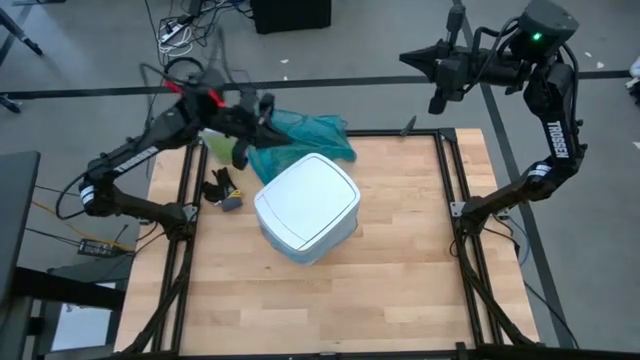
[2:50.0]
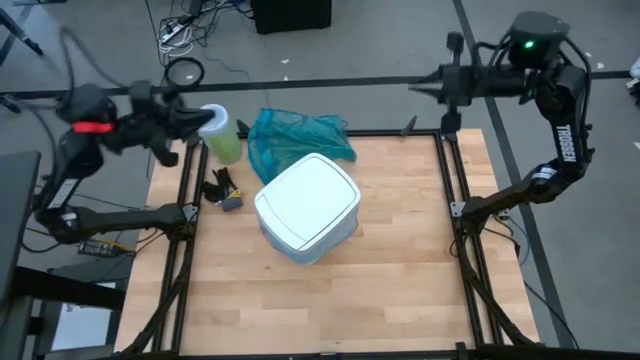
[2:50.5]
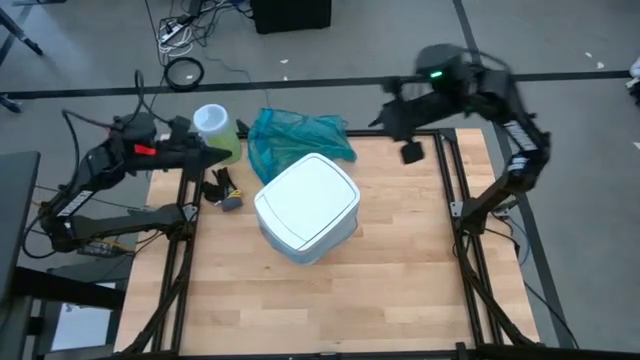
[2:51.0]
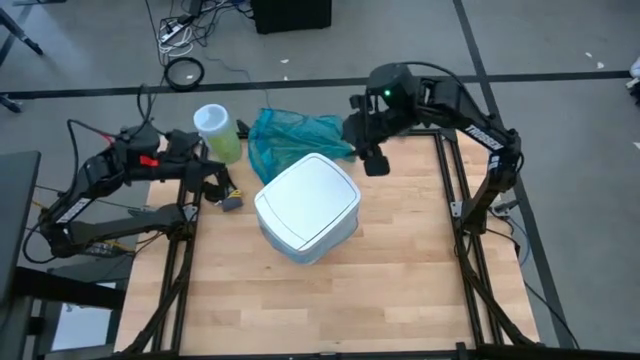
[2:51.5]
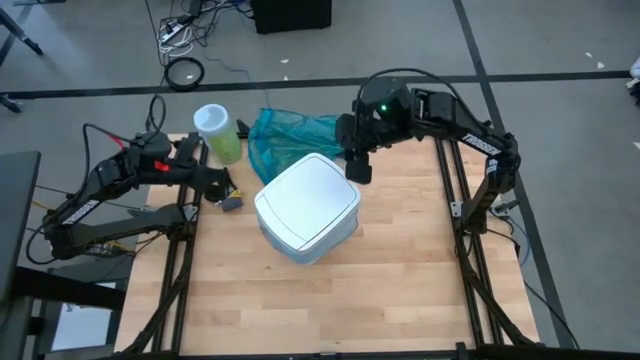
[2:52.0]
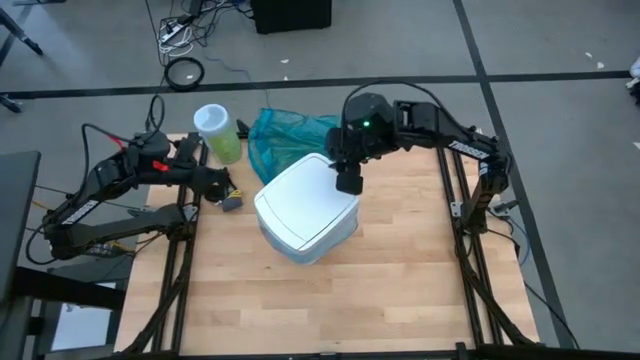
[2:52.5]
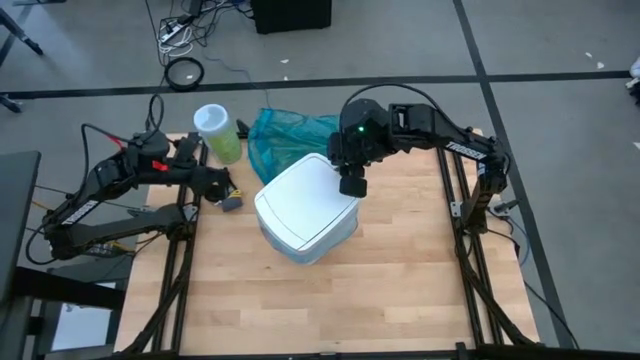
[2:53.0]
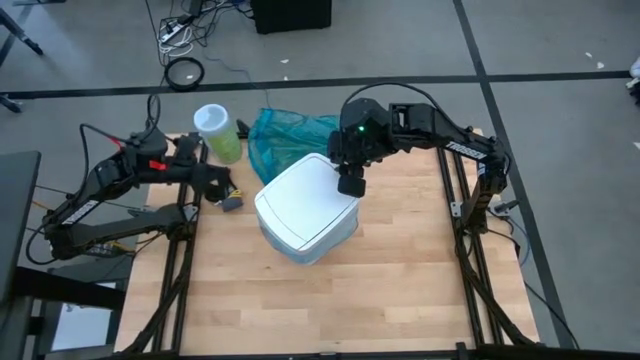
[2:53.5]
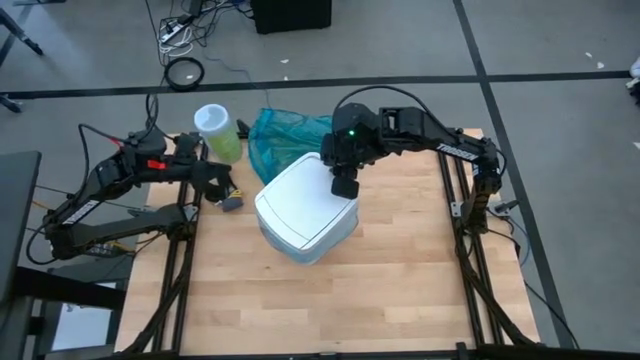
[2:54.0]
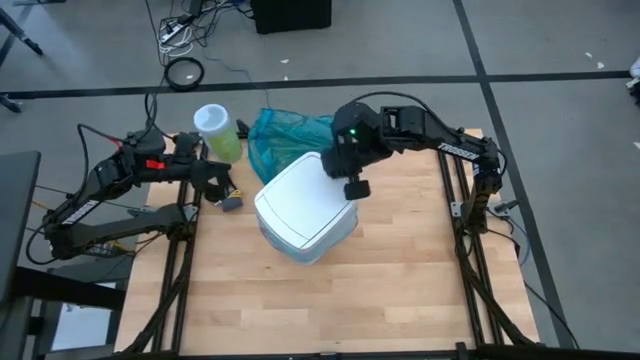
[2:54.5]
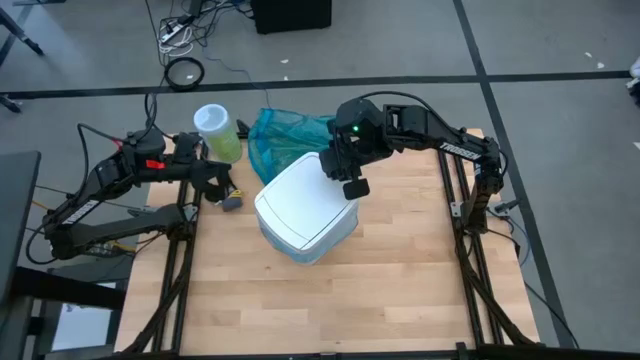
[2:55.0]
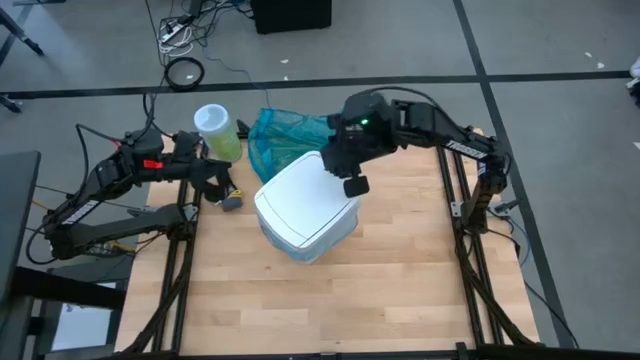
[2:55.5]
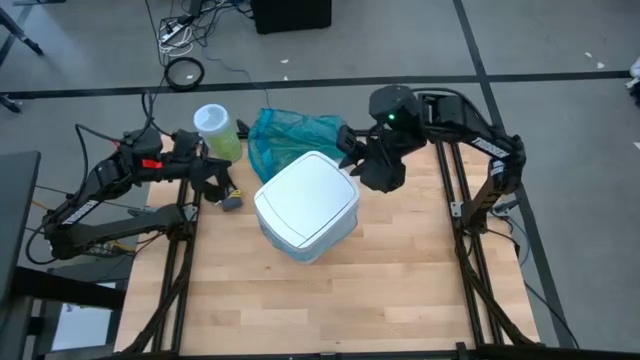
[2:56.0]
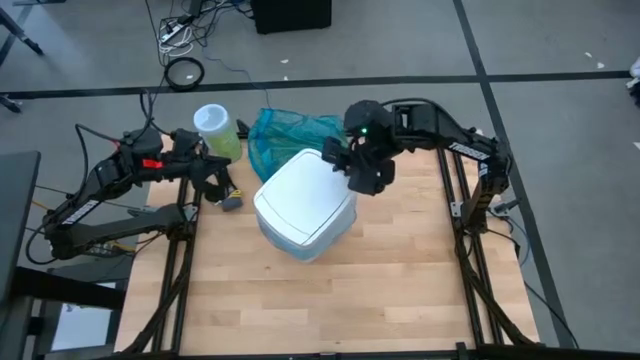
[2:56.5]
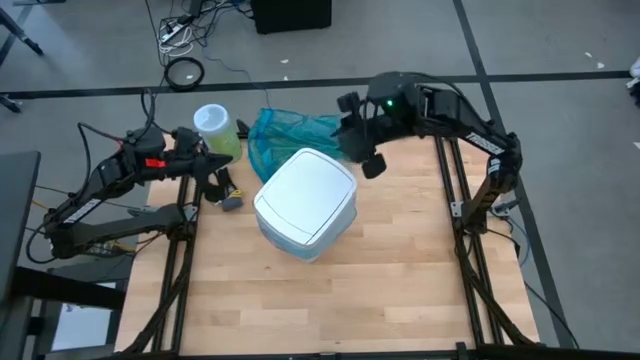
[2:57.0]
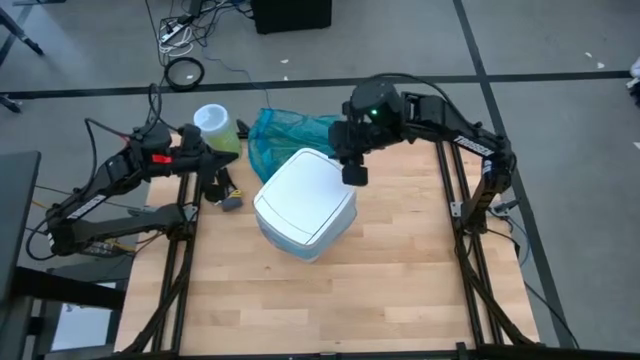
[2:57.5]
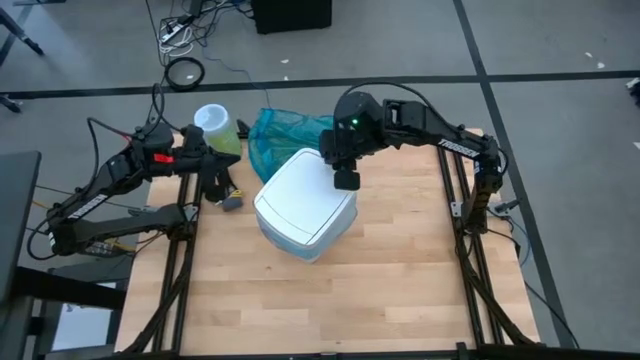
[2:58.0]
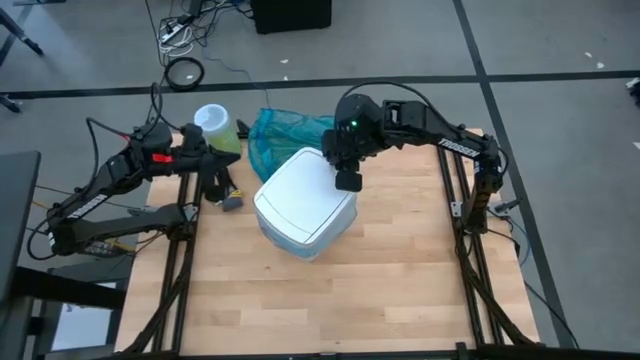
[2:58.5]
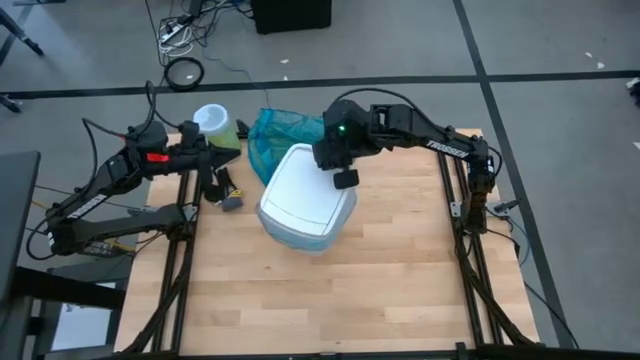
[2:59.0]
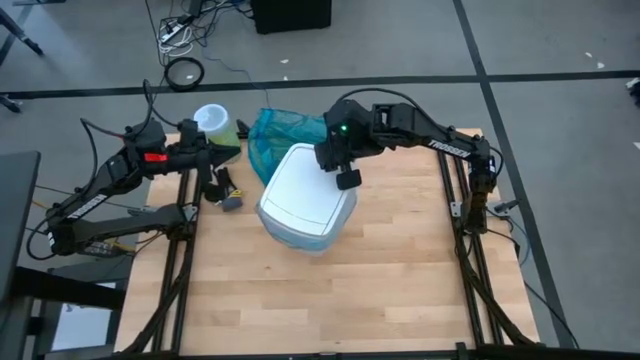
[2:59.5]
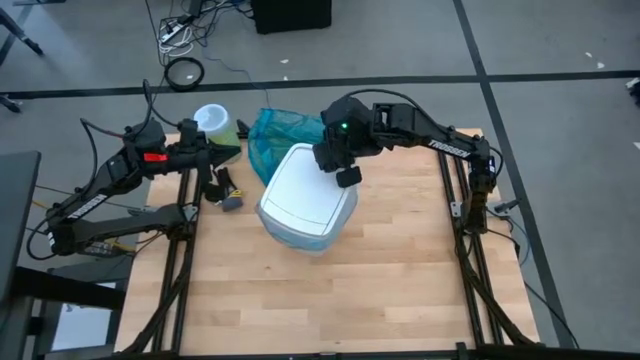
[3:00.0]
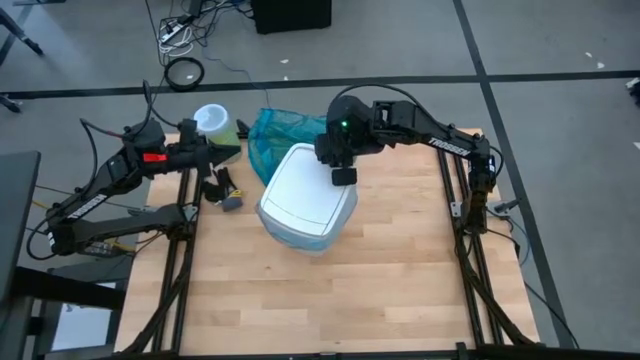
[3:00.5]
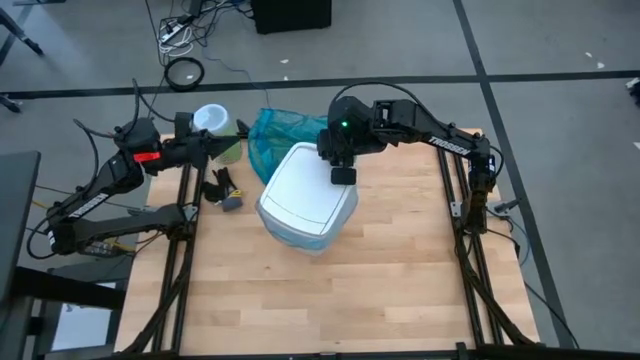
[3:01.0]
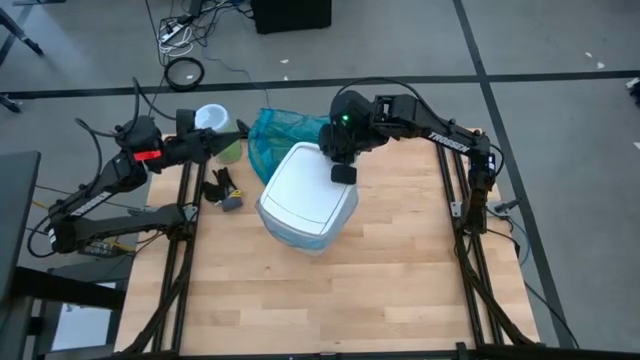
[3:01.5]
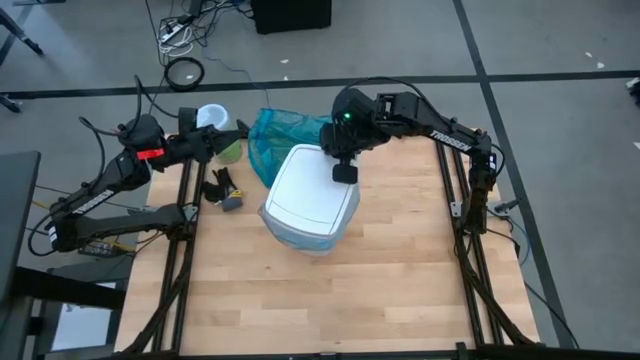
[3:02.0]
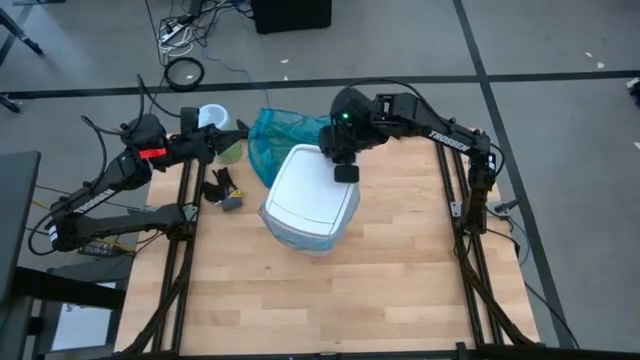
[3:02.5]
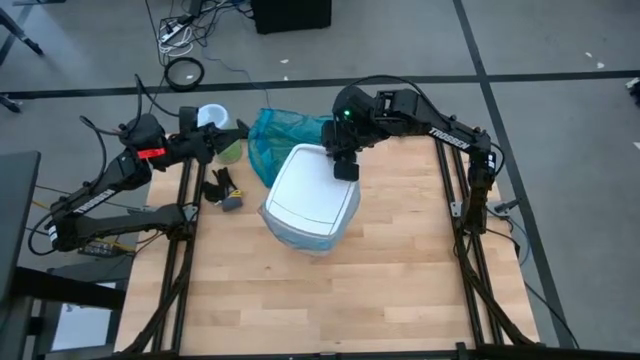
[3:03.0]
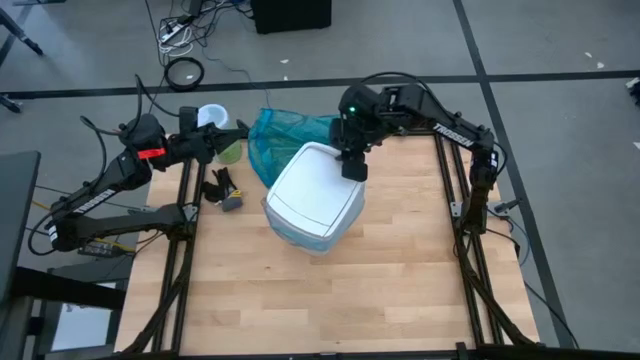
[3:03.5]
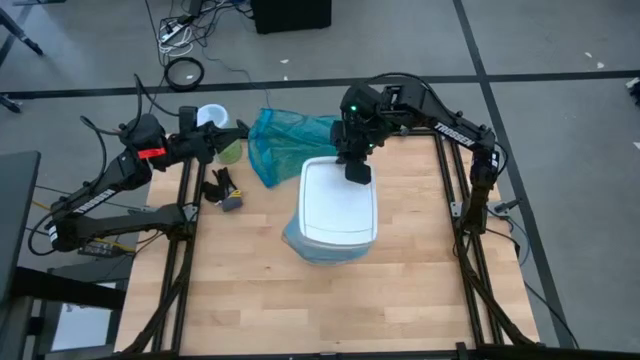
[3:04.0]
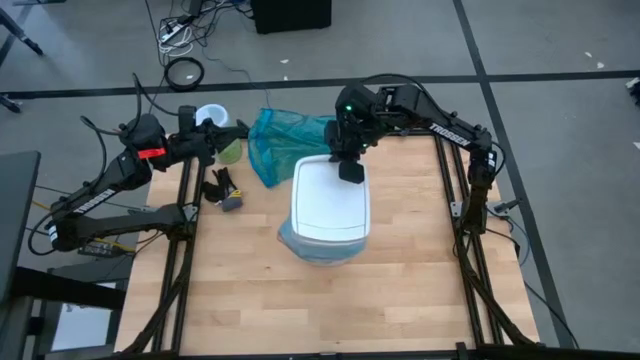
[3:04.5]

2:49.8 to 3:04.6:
Task: place trash/remove bag and relplace
Remove the white trash lid from the white trash bin

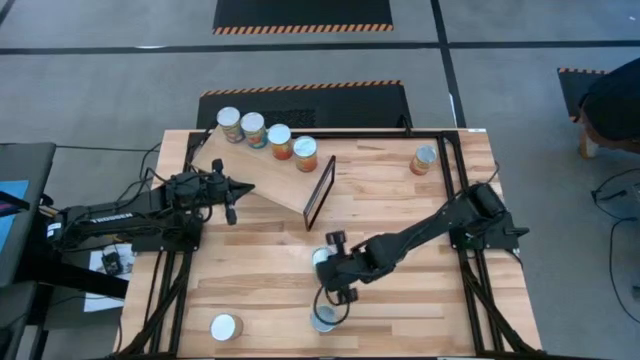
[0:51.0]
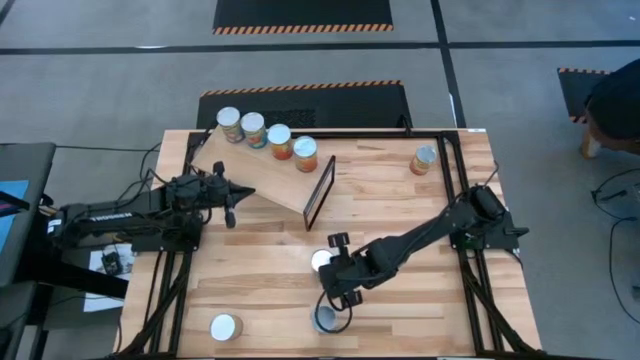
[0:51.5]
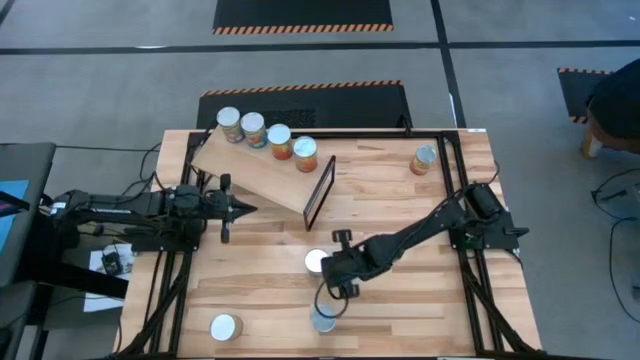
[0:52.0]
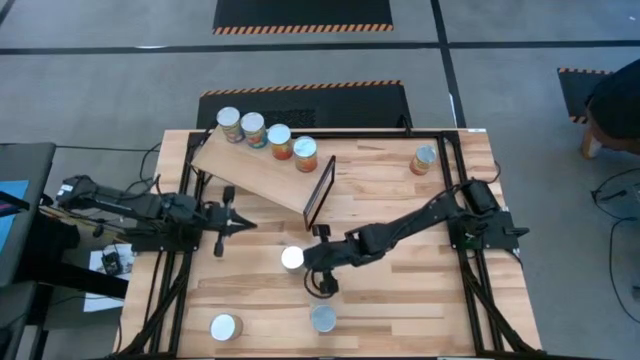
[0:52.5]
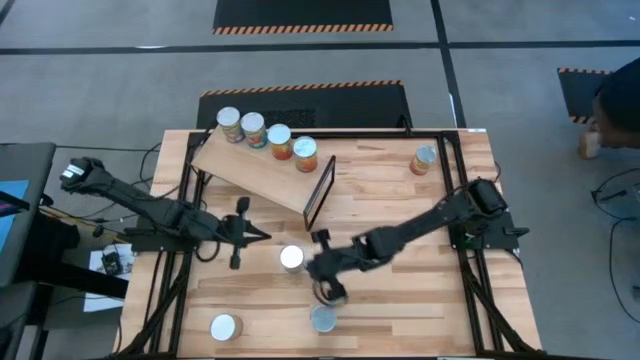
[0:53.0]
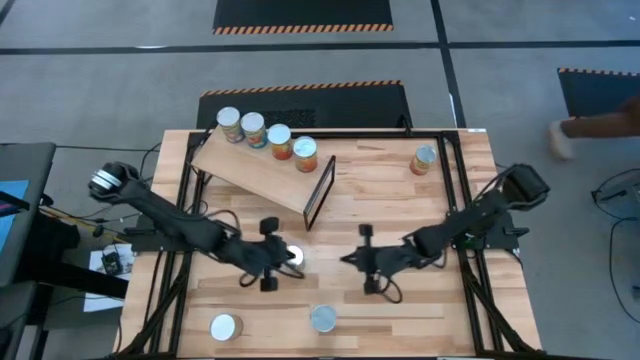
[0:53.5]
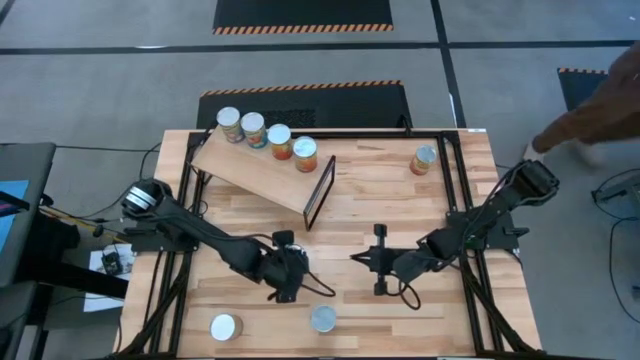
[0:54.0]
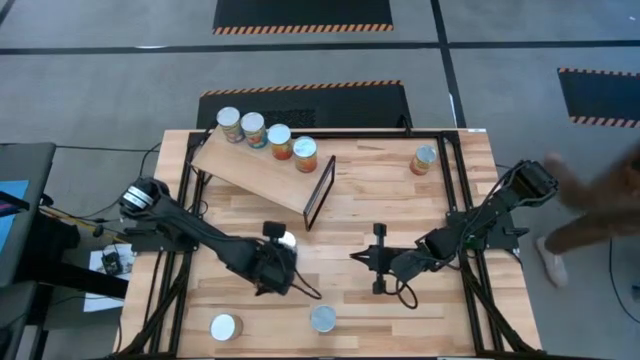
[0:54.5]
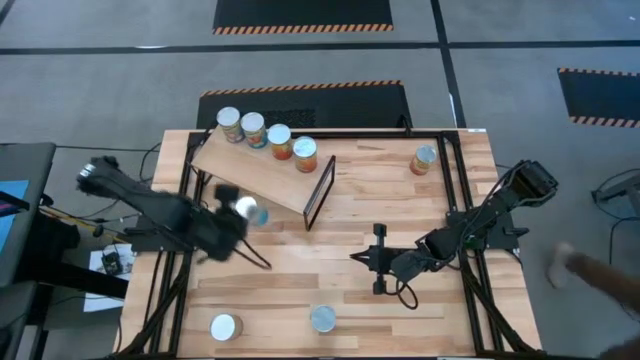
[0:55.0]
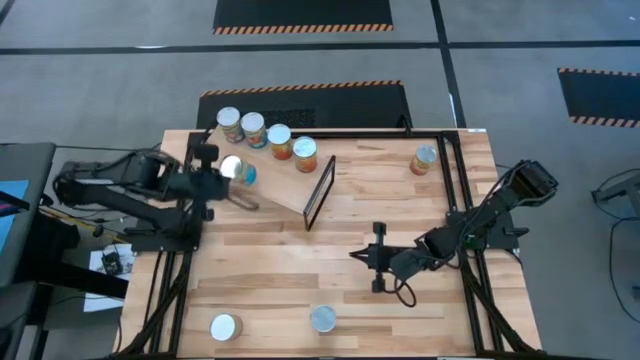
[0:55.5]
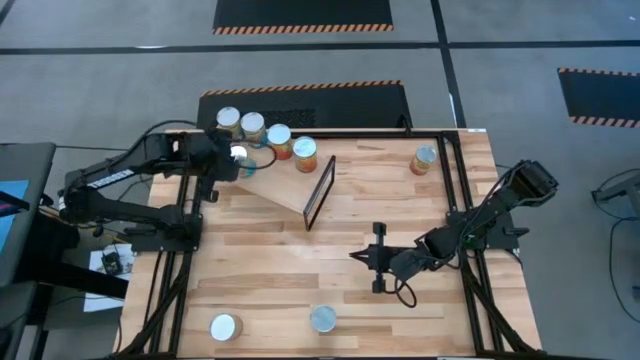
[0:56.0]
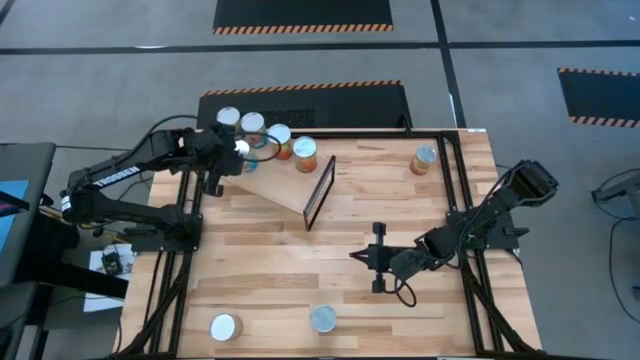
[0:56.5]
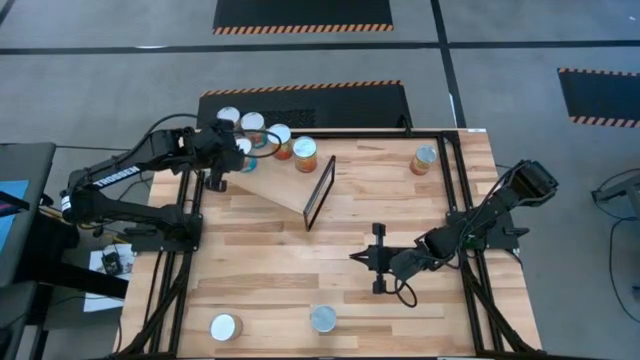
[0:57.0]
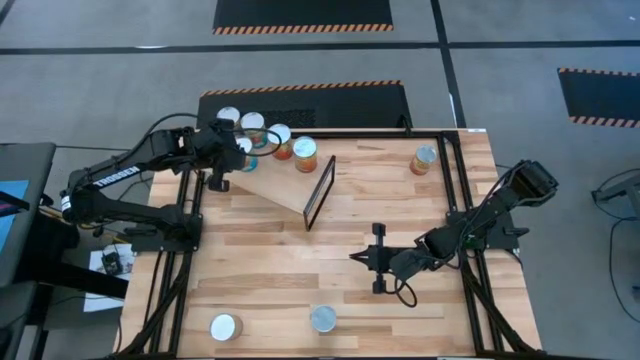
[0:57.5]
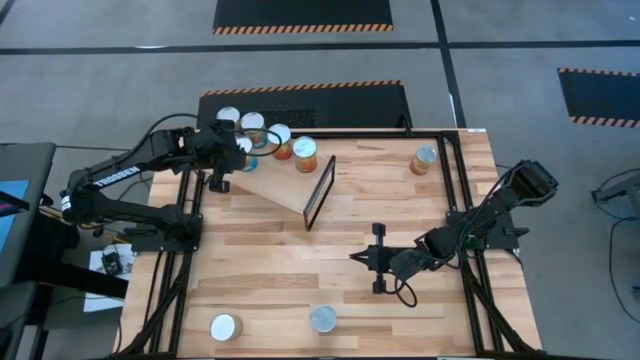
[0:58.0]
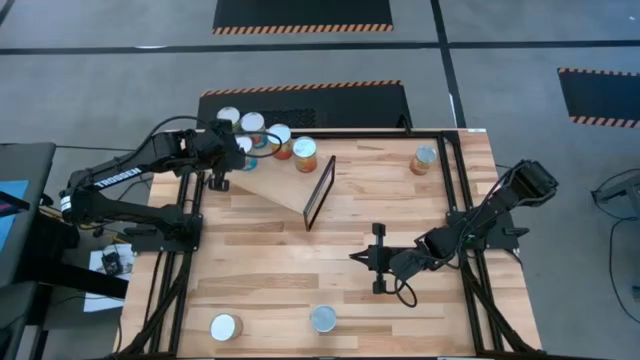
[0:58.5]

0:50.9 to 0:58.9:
Task: Pick and place cans onto a shelf
Align the canned tomatoes with the other canned tomatoes on the shelf
